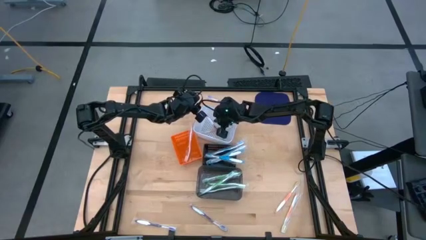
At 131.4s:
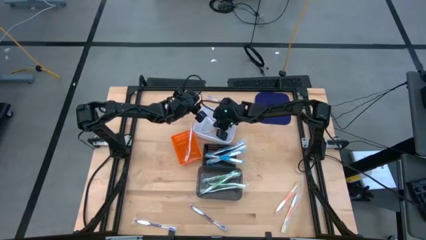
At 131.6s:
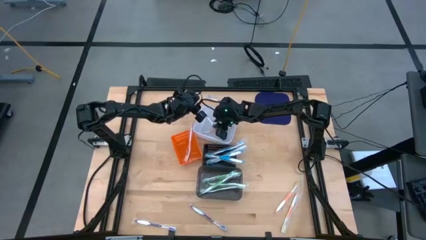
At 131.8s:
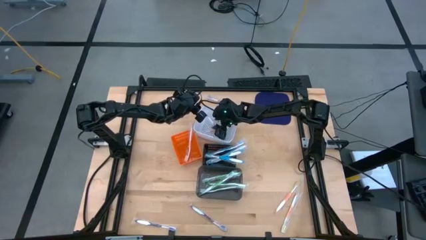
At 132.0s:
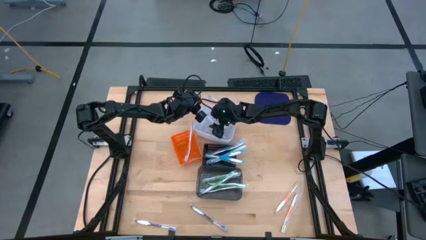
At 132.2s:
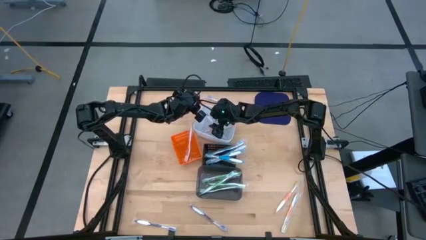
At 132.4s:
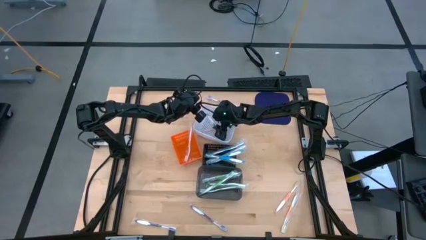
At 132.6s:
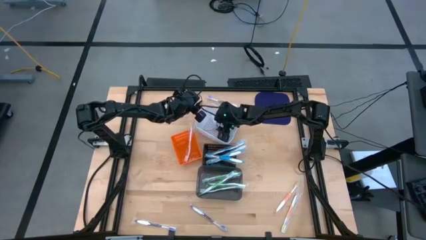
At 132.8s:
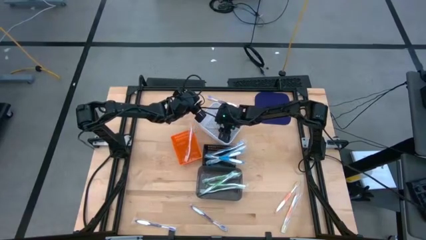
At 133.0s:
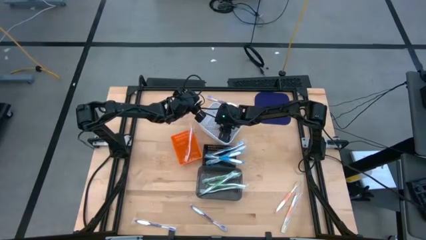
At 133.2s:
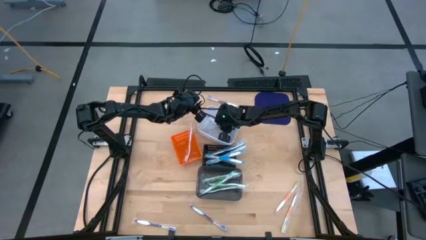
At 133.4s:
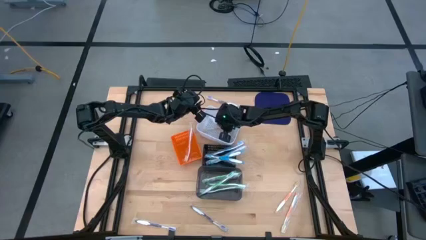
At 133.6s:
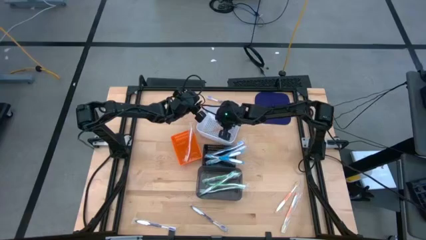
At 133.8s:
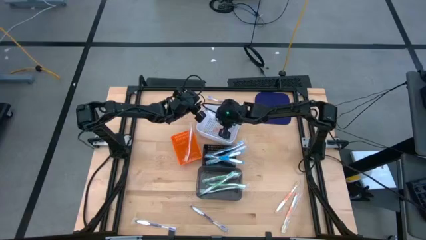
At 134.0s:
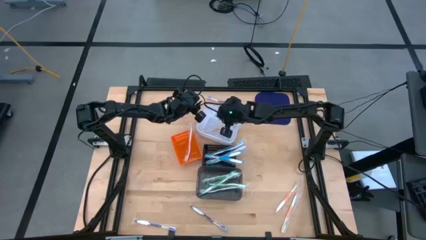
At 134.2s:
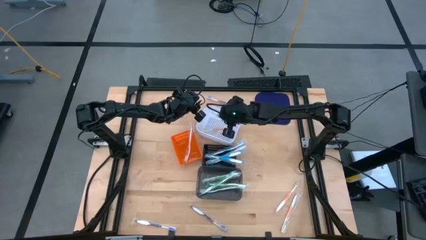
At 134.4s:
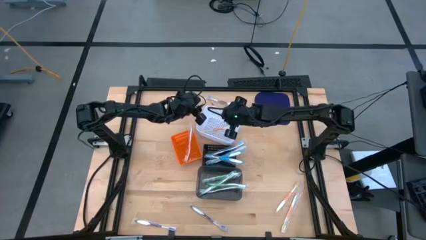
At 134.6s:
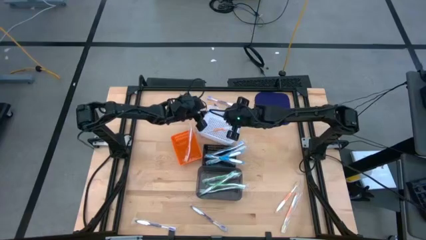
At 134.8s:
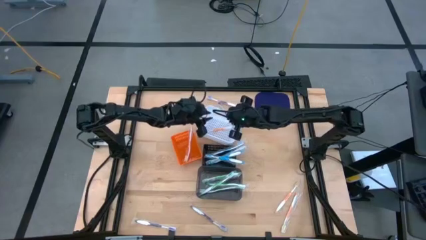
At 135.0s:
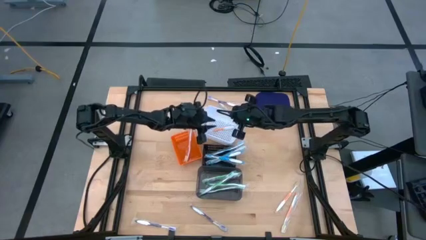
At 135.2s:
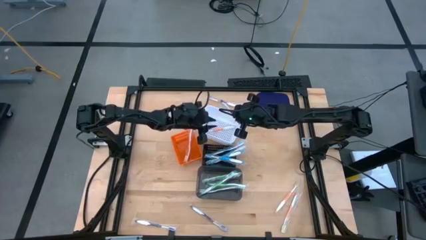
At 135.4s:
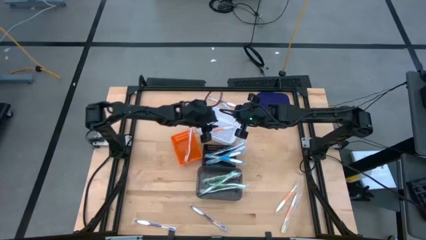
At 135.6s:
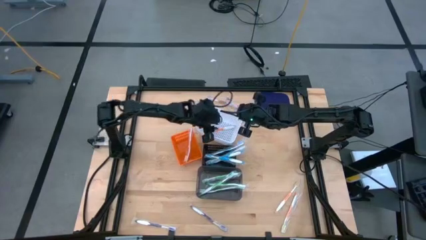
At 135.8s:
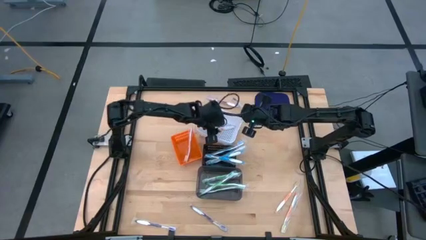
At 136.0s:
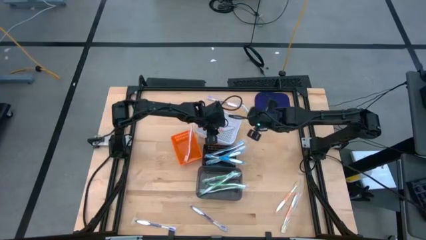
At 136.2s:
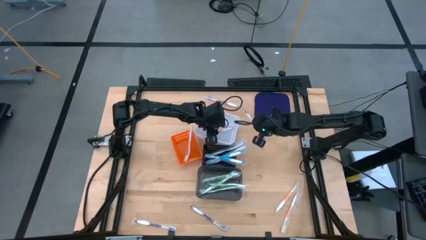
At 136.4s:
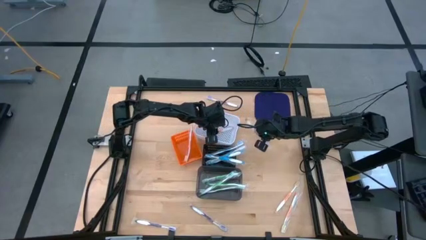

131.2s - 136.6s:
Task: Pick & Place Toothbrushes
Remove the purple toothbrush from the white basket

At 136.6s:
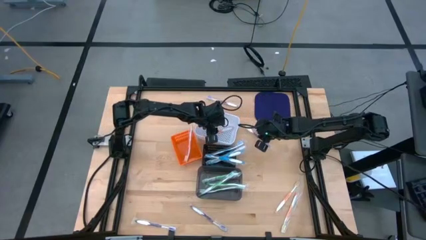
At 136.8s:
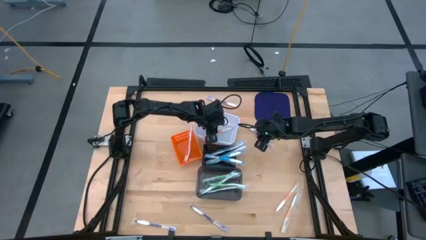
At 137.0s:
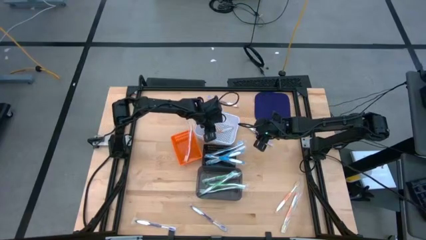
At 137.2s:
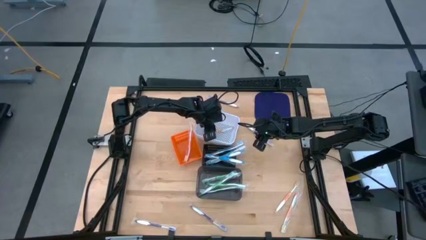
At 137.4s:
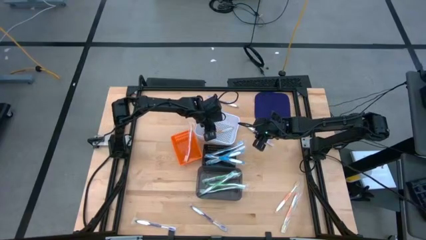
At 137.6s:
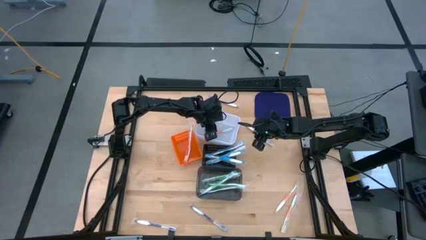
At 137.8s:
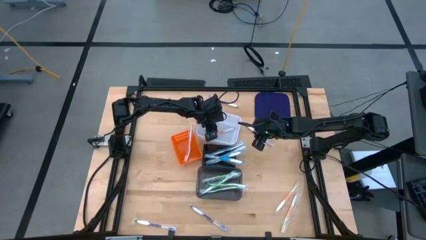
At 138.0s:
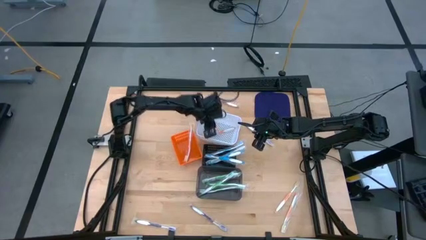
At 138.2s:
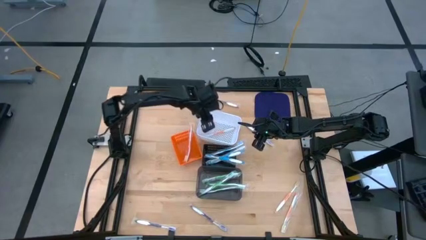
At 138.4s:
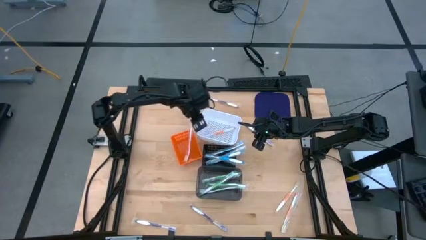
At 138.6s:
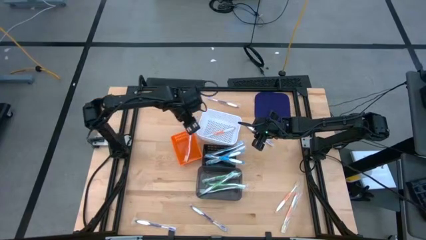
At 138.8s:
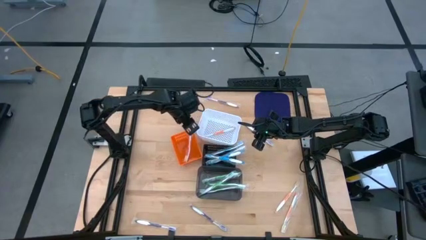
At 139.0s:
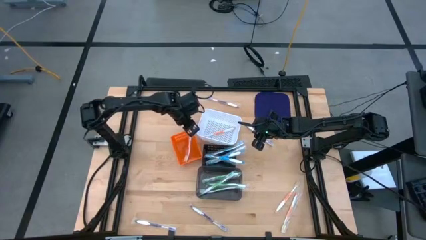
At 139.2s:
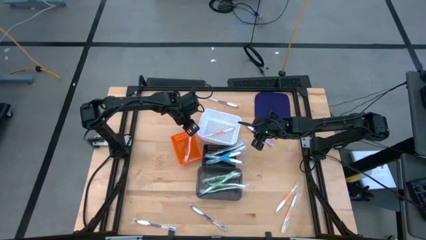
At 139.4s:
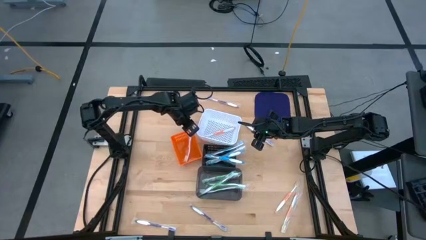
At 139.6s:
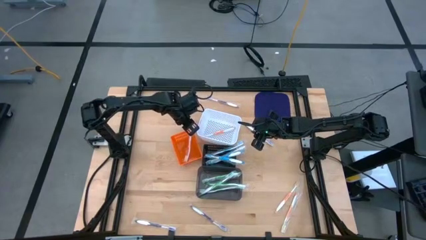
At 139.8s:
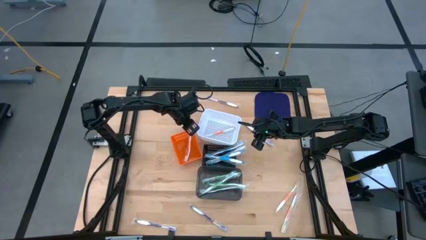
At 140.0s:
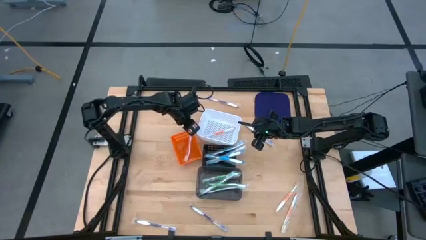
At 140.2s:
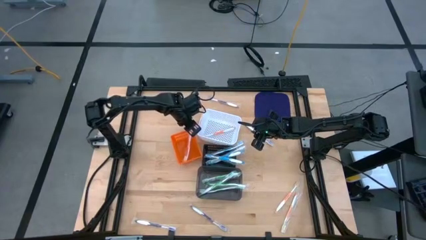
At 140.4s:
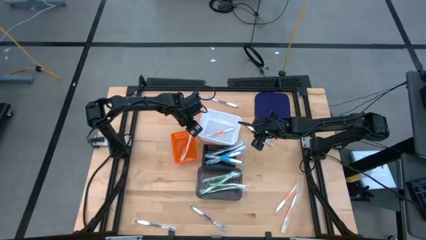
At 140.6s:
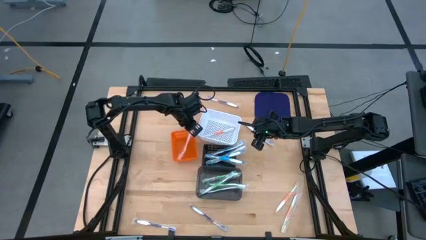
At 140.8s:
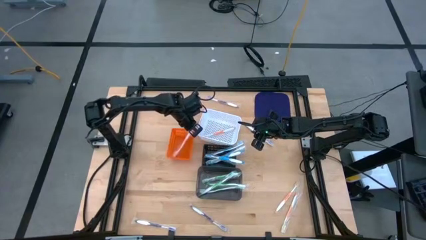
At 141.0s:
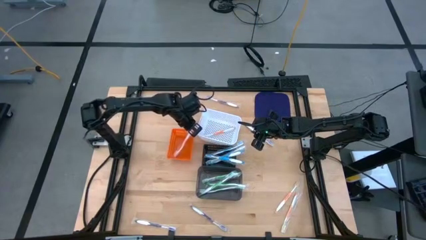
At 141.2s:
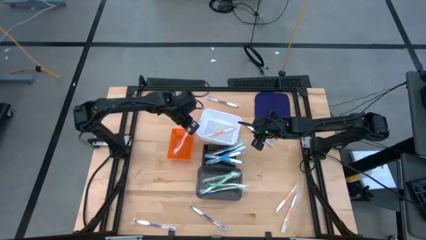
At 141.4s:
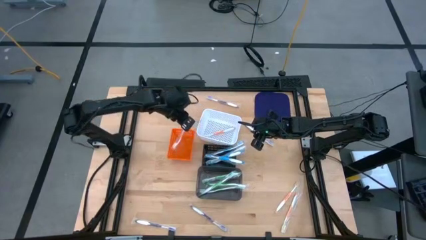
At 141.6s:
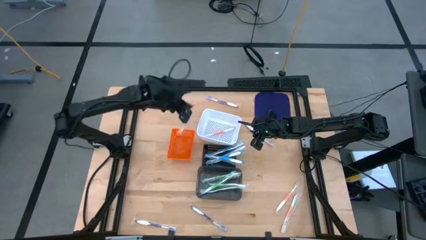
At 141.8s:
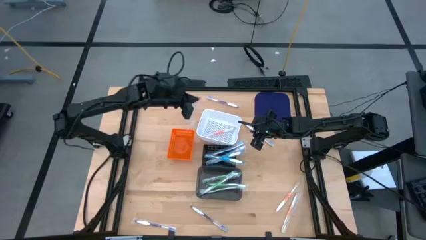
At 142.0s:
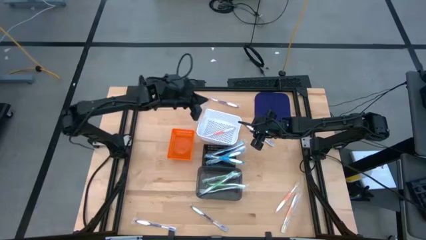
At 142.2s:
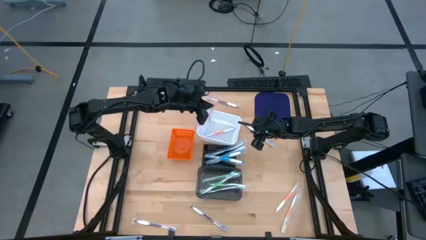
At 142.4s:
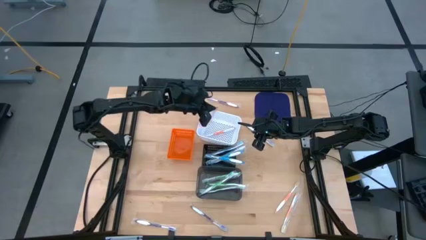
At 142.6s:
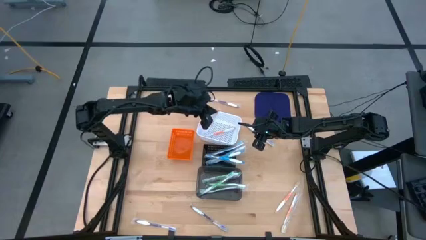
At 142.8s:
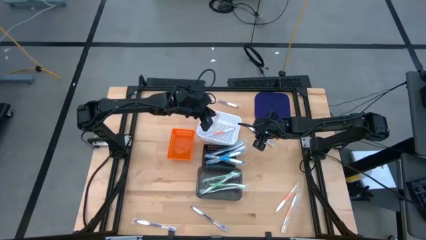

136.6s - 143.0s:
Put the orange toothbrush from the orange basket into the white basket

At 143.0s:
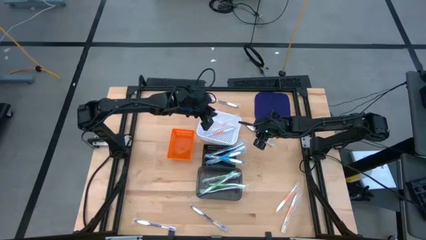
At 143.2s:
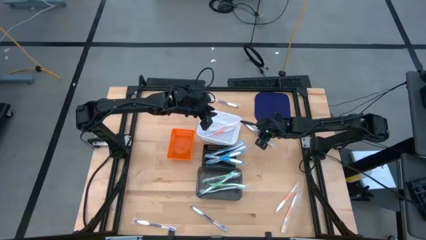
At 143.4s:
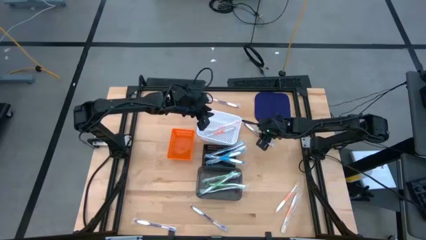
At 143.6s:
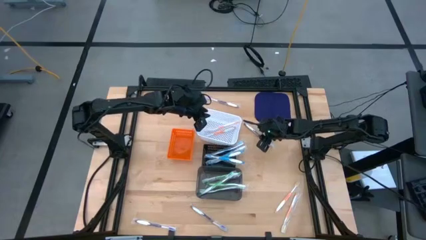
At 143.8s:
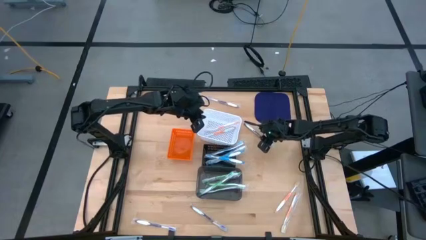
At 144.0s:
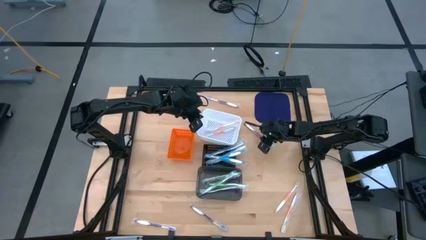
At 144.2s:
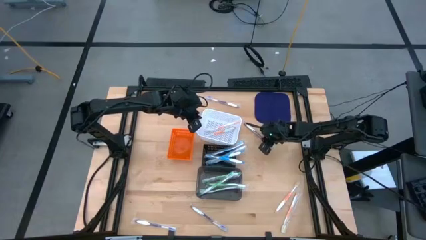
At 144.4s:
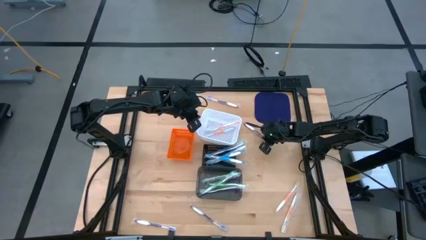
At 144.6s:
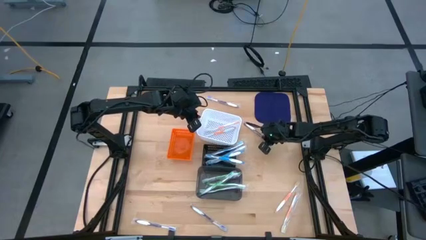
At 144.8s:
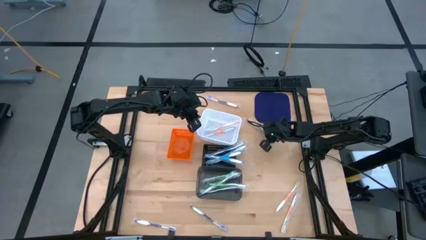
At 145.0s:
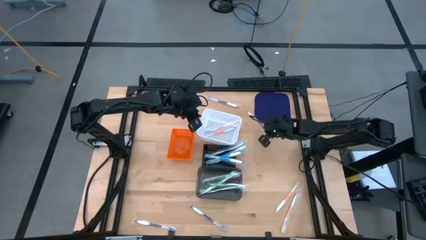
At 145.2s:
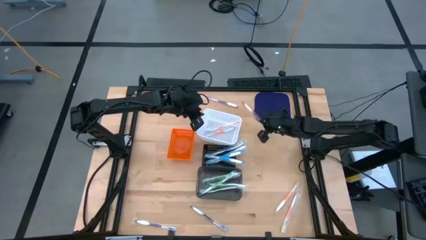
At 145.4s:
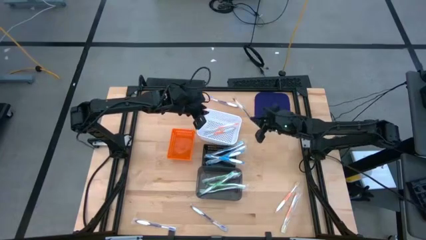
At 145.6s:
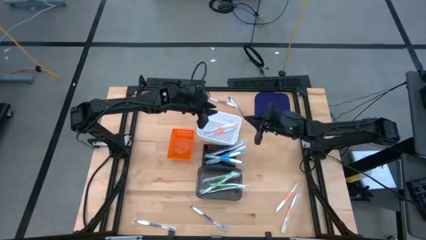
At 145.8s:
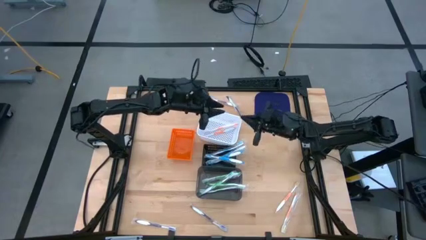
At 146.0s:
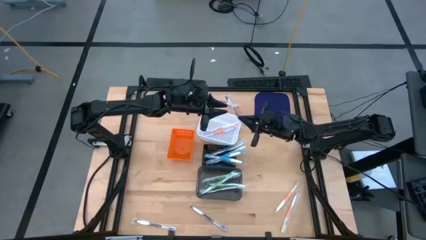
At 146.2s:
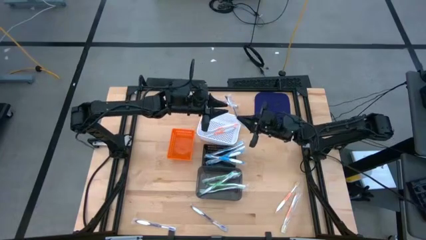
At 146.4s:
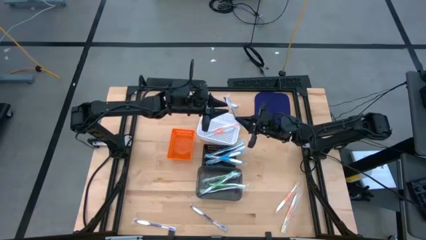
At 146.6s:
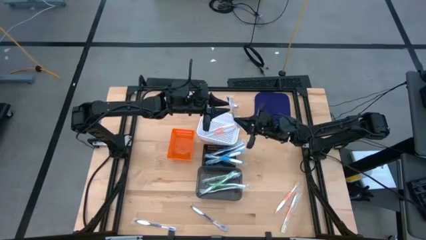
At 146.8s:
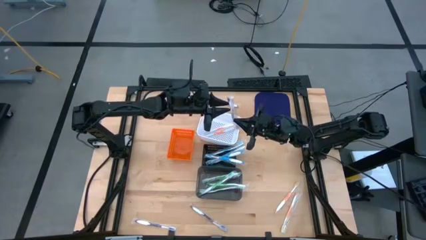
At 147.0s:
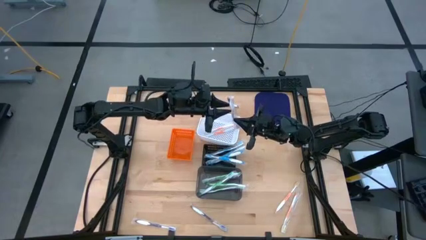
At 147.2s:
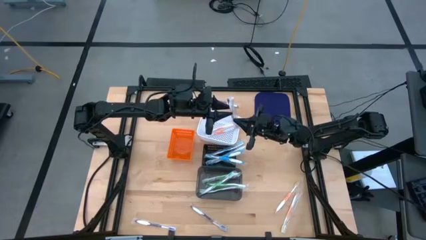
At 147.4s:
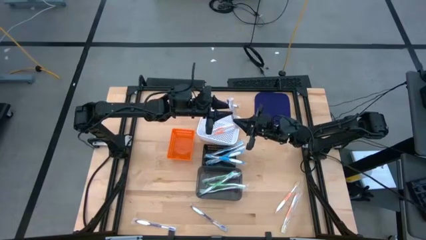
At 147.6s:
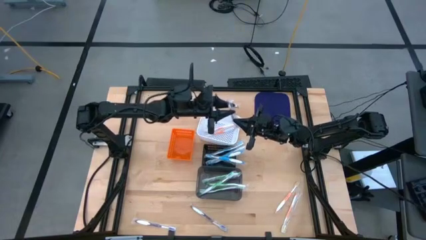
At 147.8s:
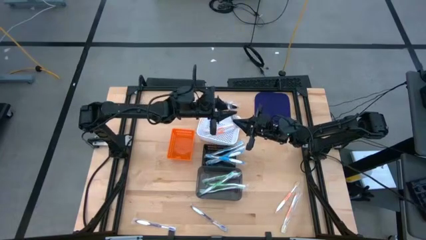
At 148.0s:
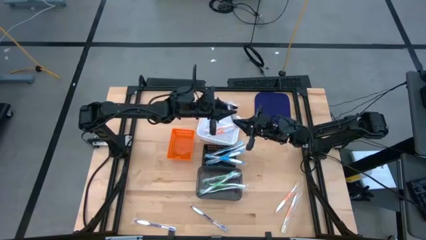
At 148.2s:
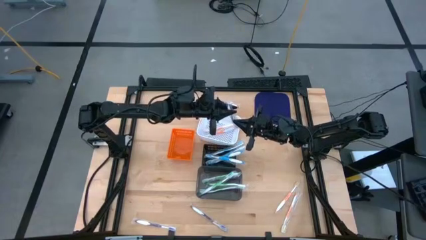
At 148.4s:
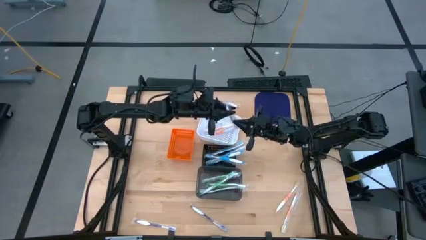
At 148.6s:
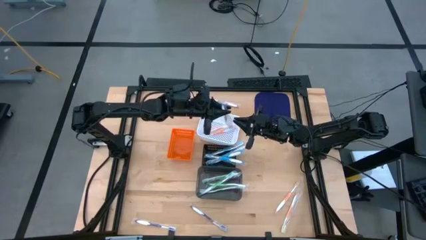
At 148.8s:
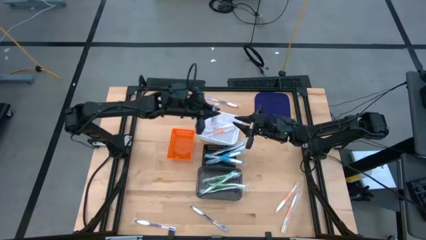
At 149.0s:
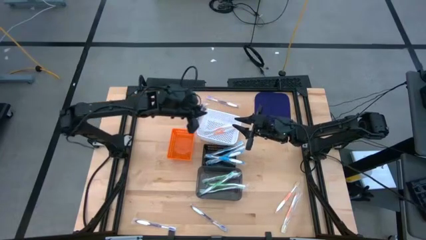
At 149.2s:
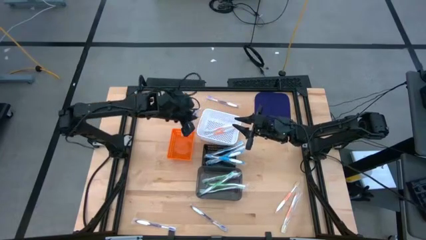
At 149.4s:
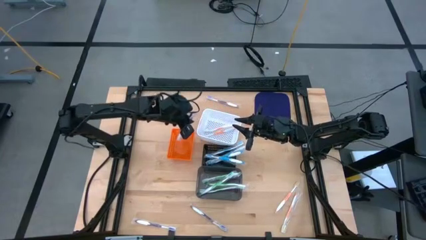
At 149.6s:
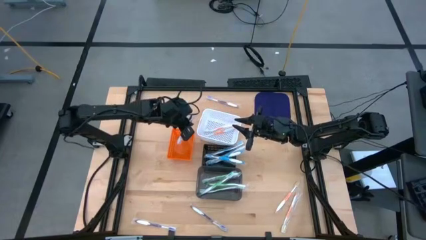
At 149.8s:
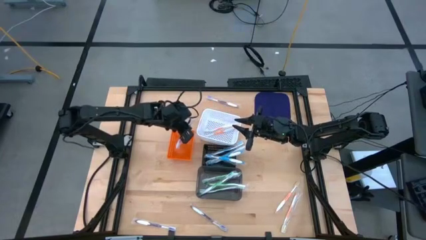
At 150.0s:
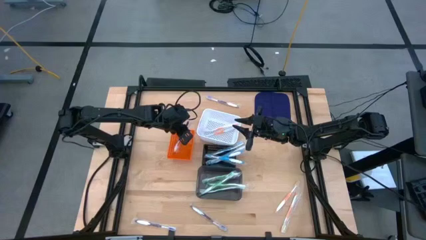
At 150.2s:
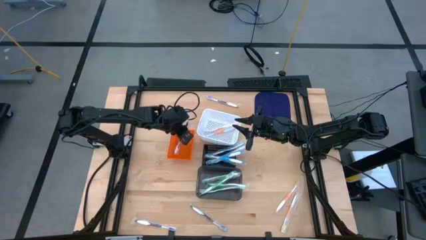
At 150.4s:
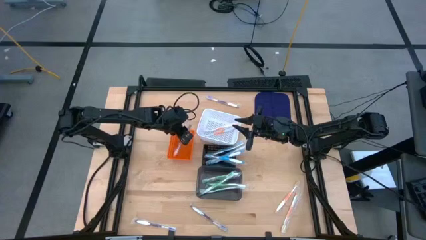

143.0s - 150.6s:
Put the purple toothbrush into the orange basket
